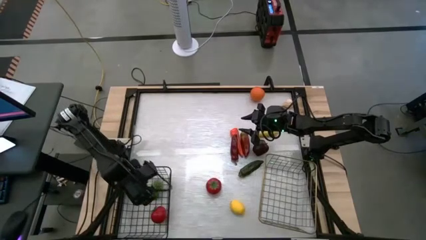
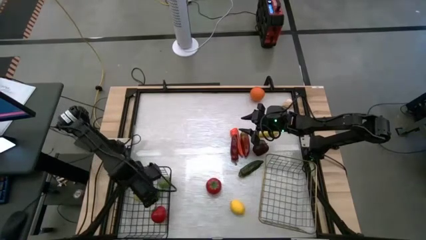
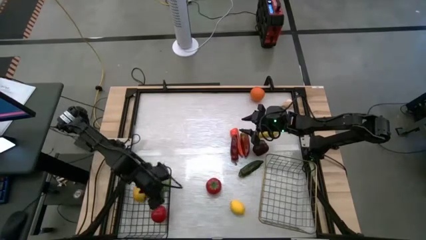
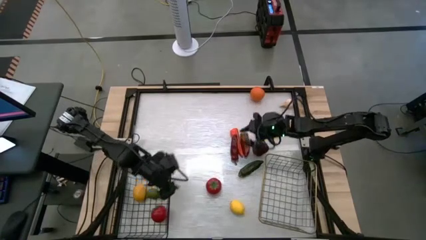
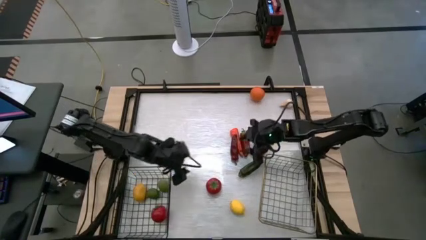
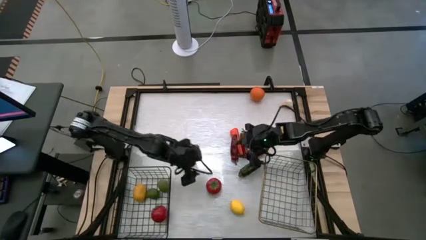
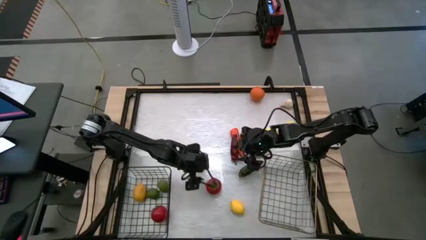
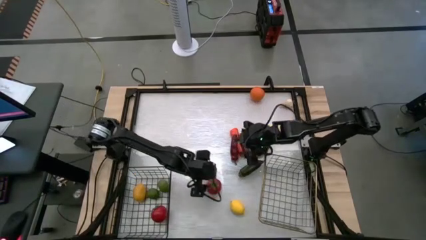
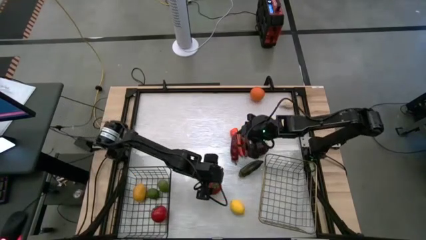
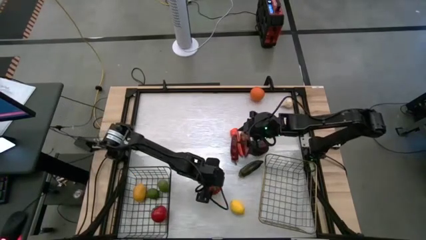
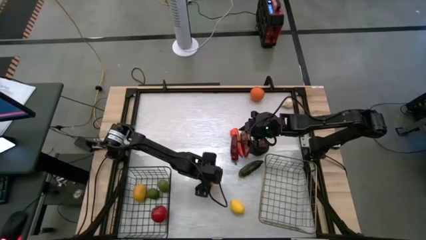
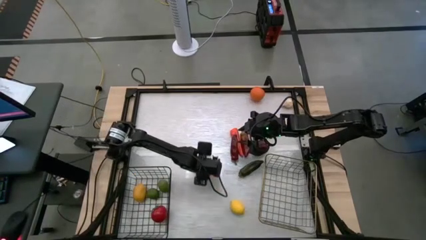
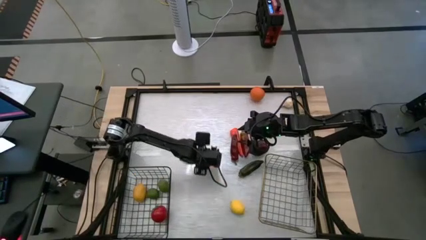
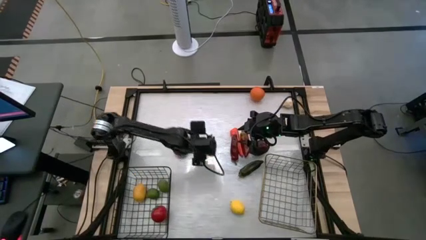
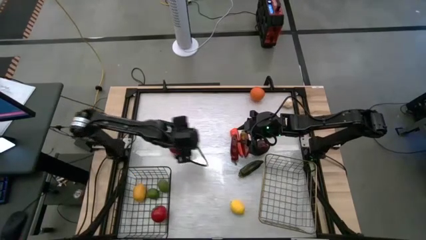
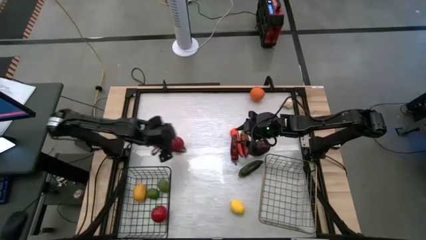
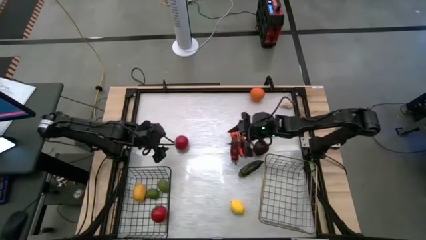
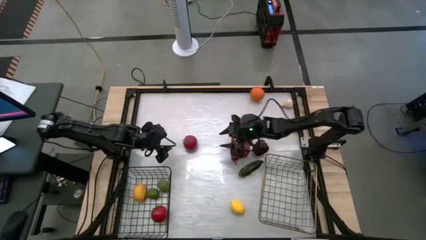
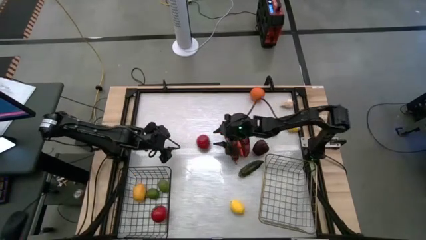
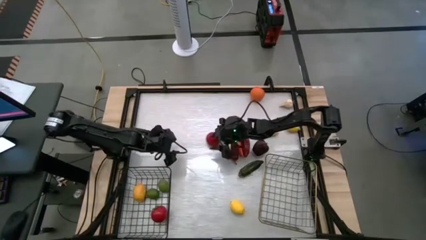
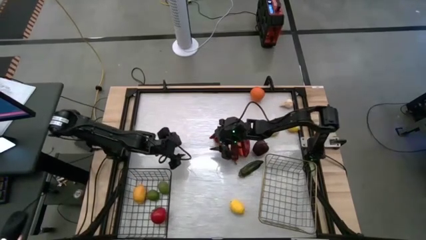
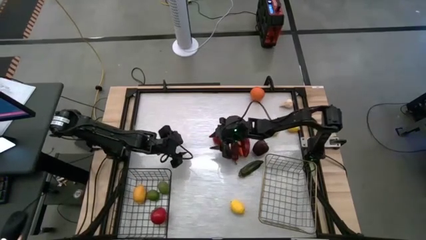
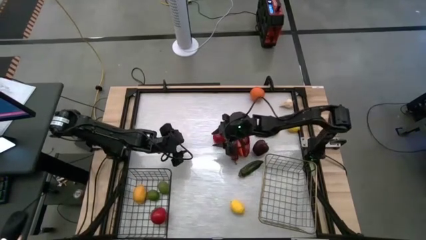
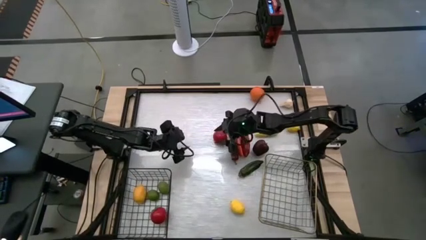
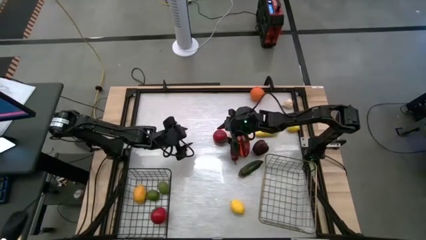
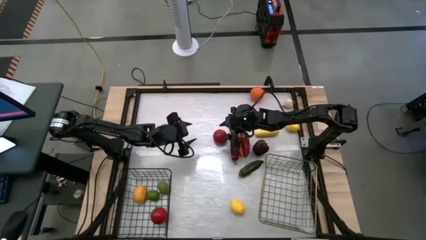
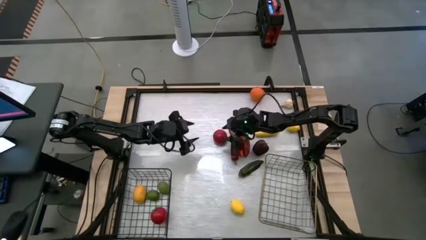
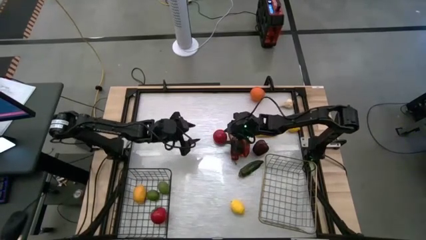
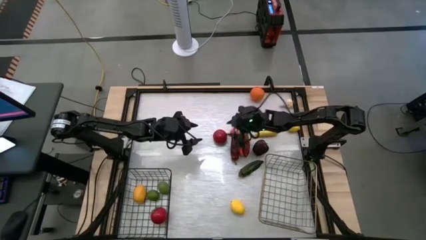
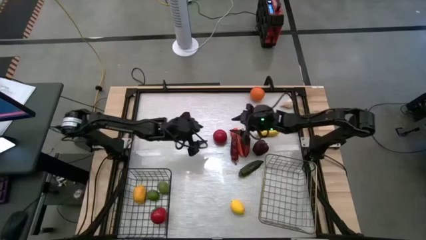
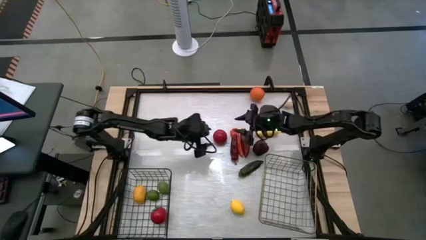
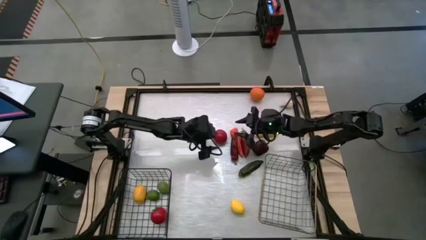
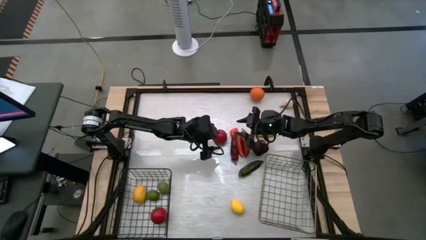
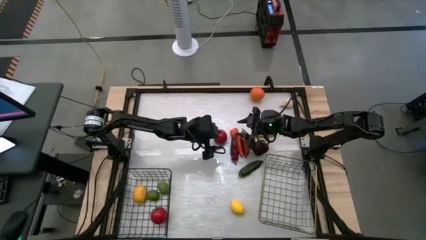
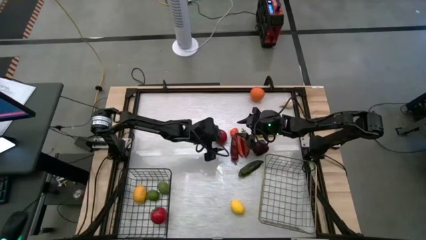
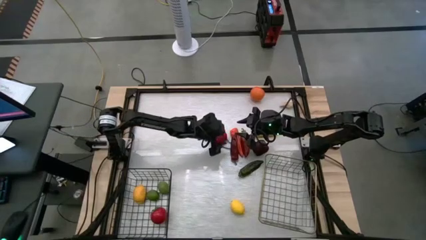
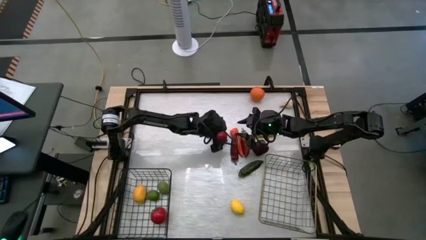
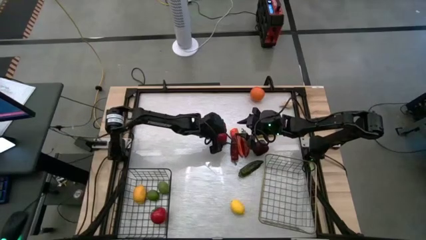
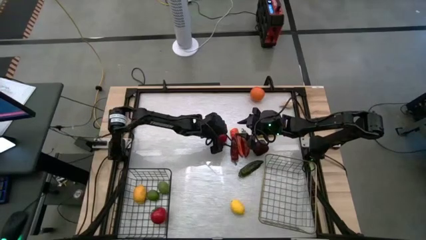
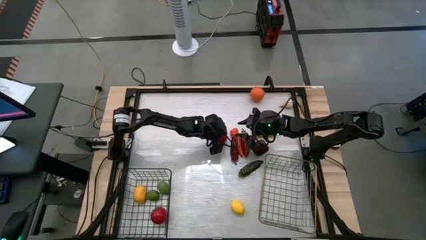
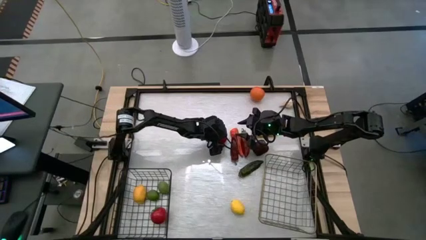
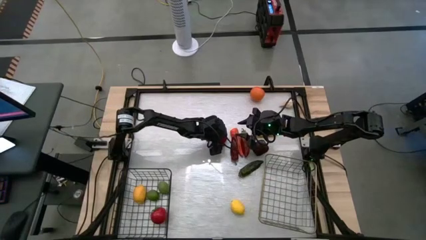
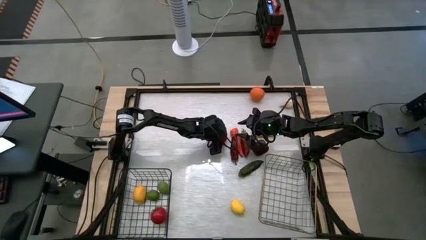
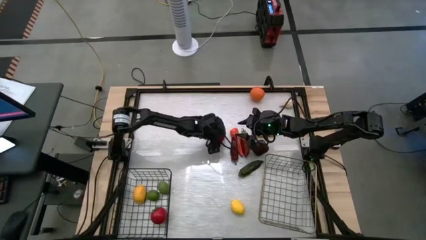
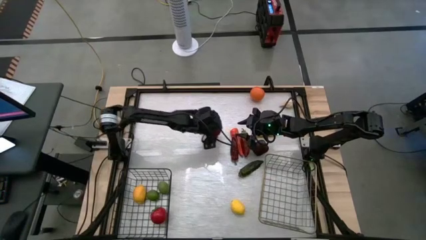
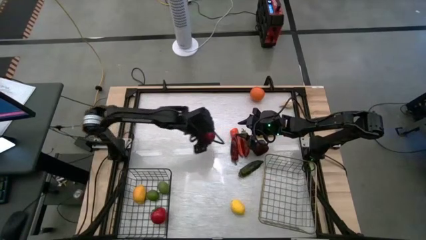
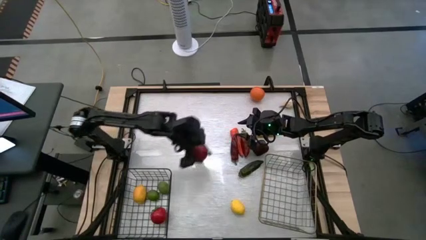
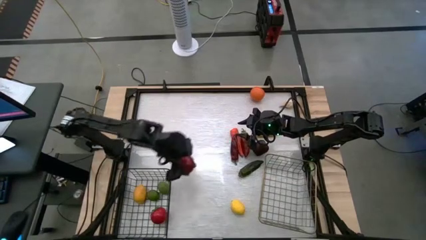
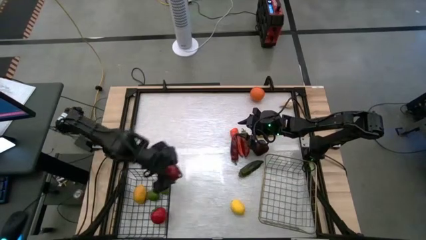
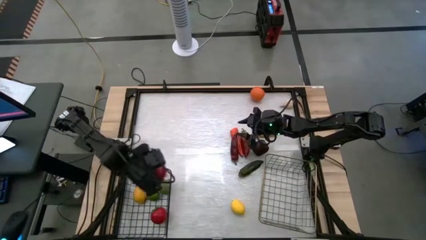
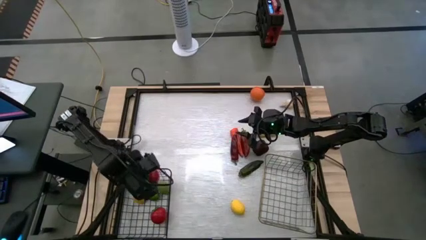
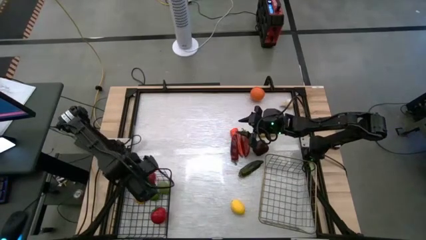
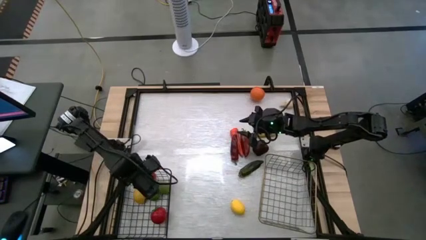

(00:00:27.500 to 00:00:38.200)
Task: Sort produce into baskets
Put the red tomato into the black wire basket

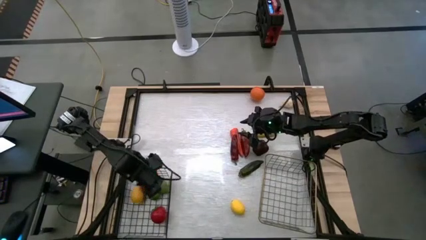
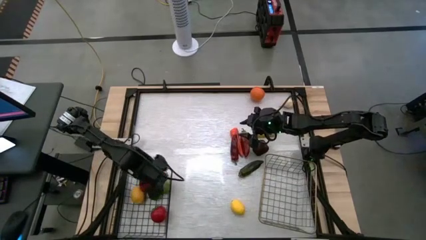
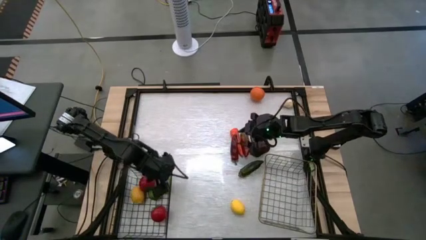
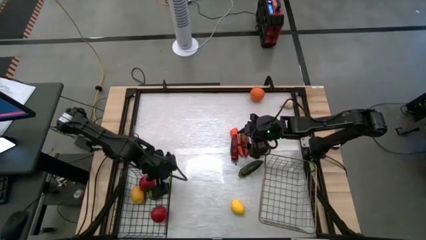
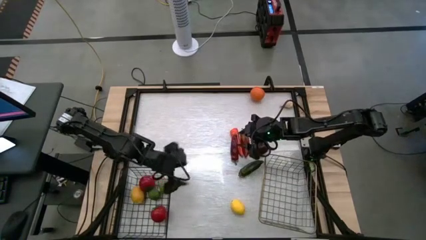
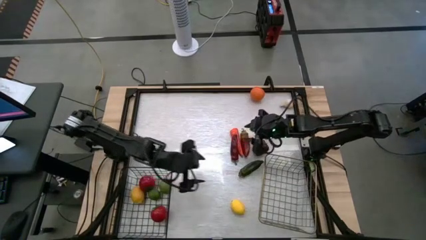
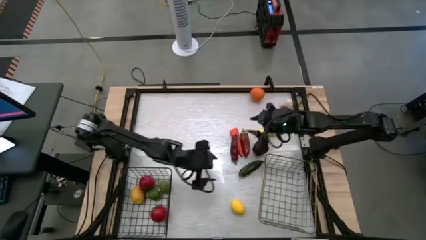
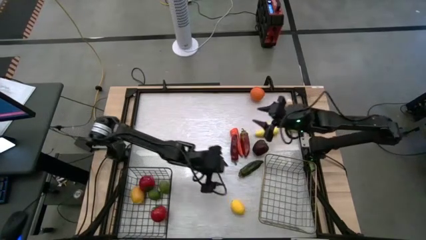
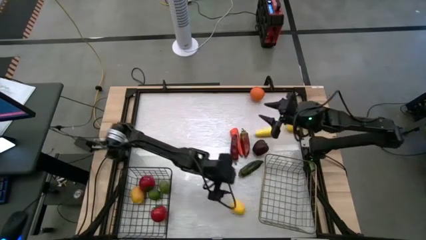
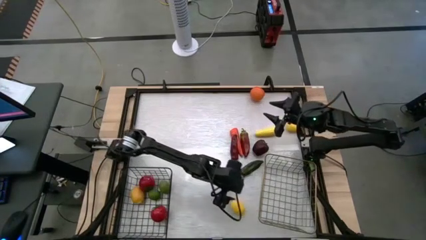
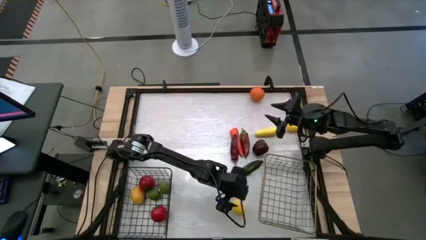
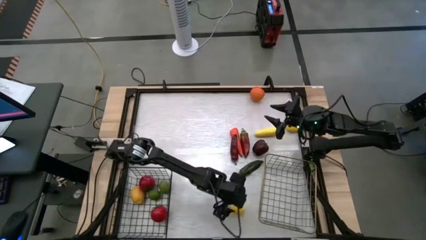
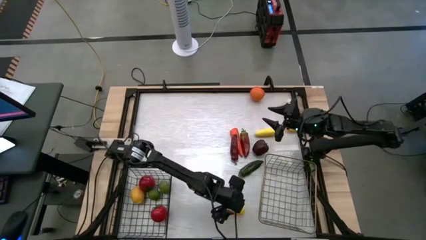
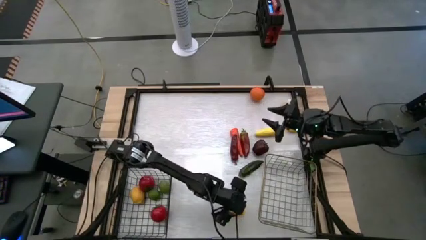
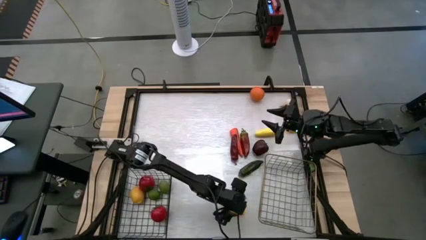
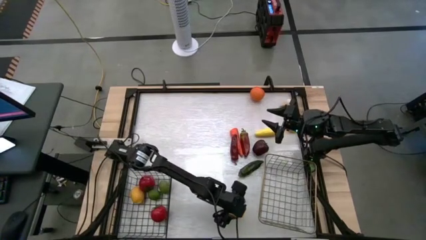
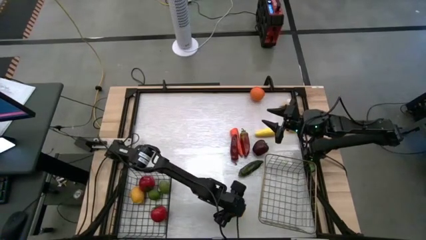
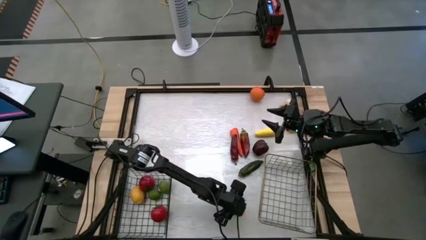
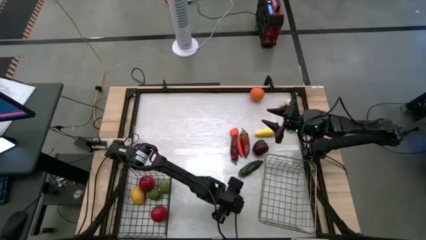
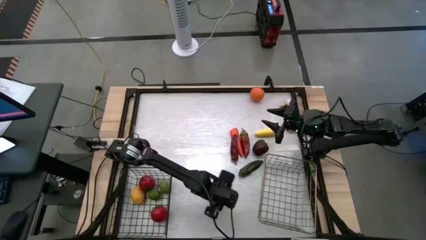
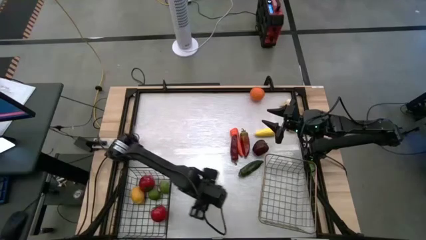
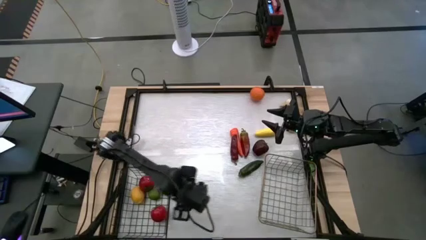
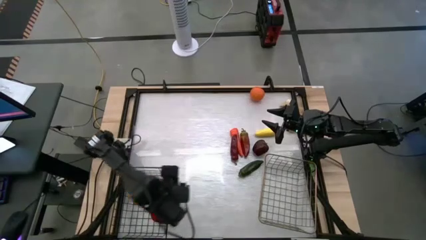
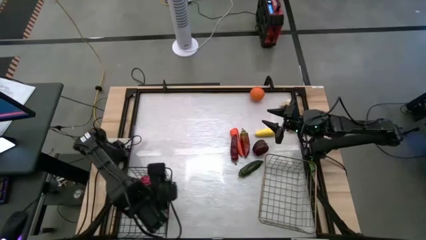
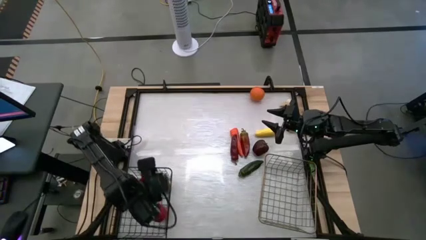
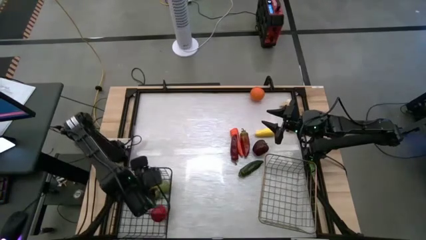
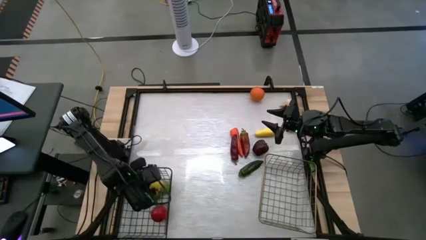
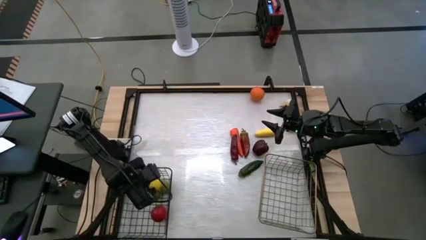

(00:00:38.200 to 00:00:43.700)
Put the bottom yellow lemon into the black wire basket

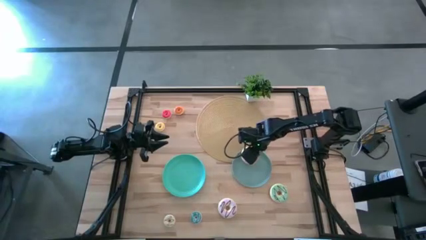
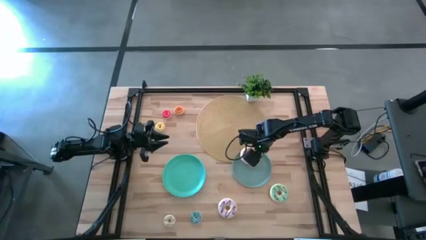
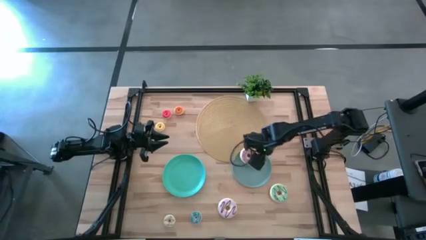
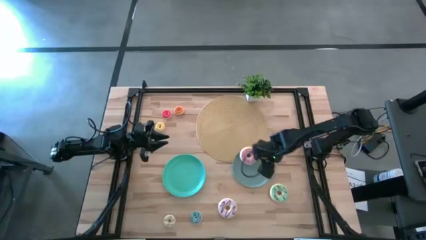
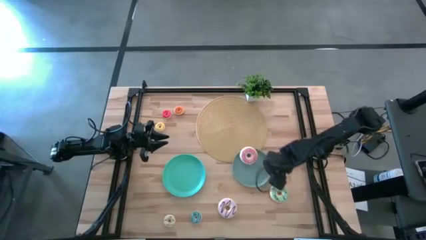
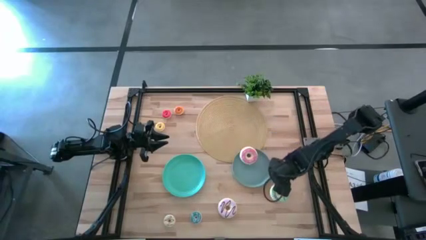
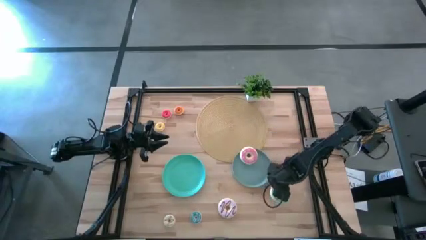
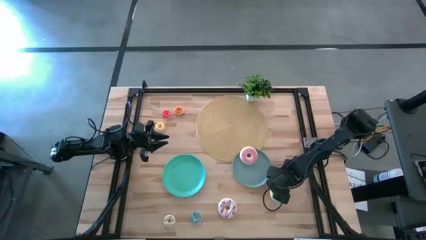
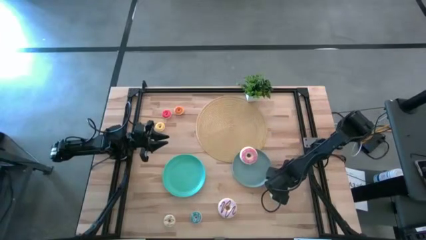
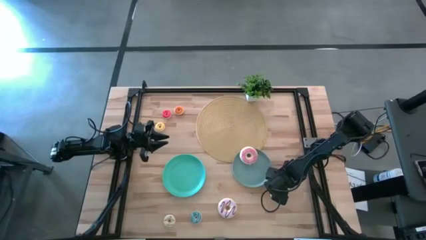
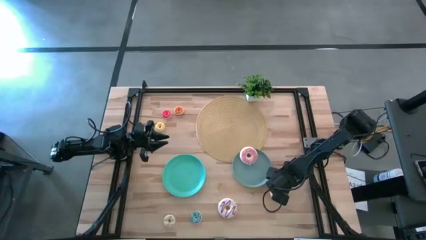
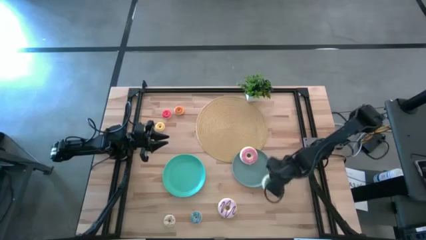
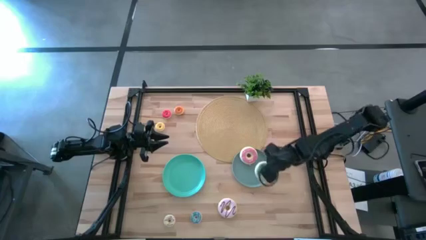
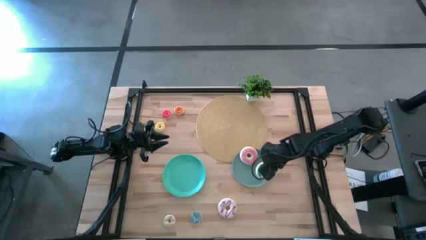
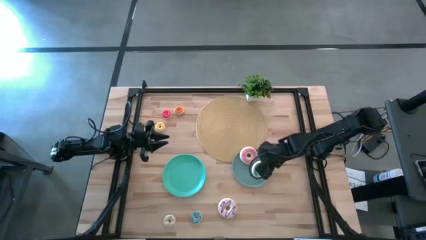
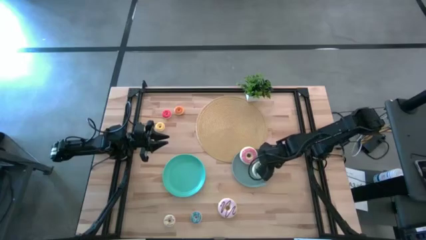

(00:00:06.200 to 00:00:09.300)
Task: Pick & Place donuts
Put the large light green donut on the light blue plate
